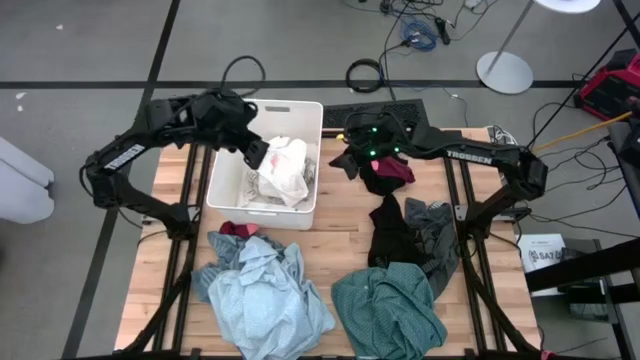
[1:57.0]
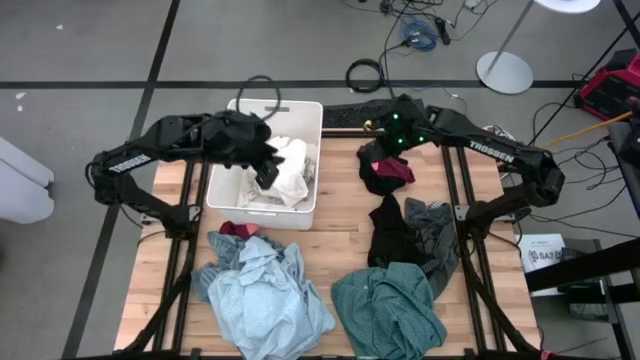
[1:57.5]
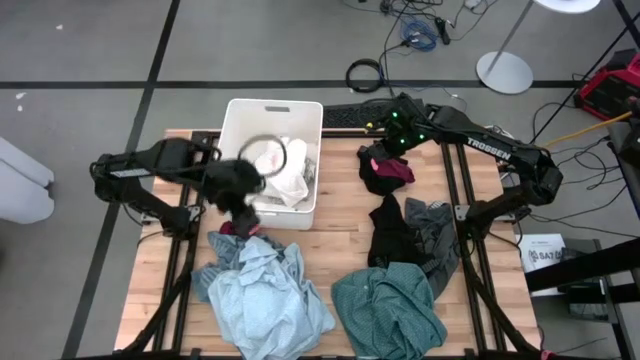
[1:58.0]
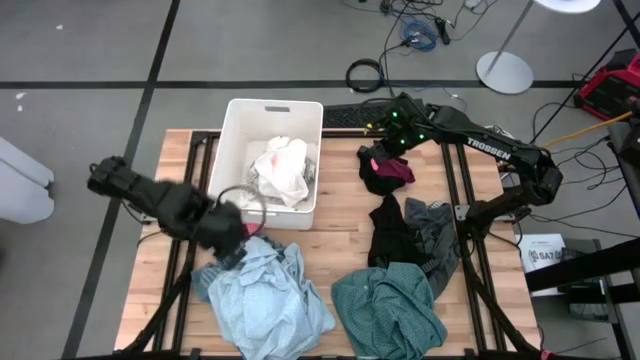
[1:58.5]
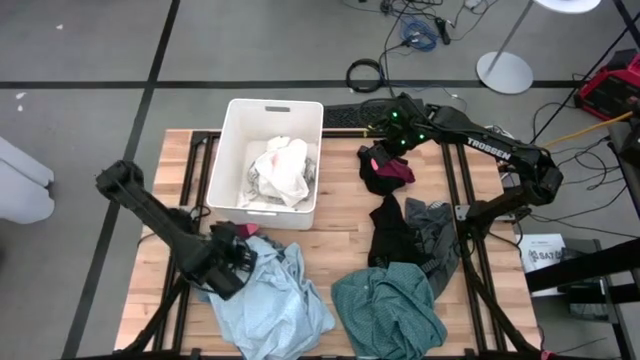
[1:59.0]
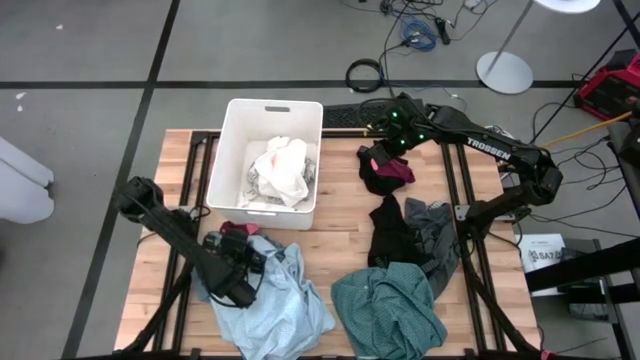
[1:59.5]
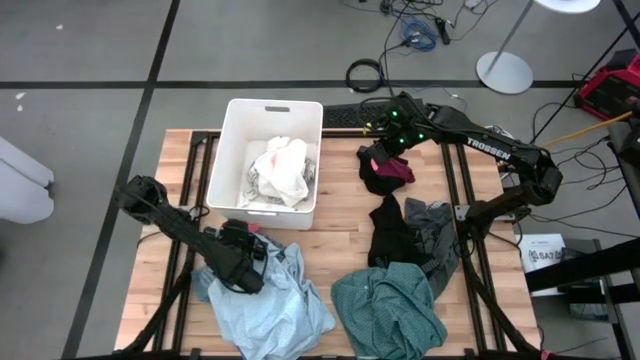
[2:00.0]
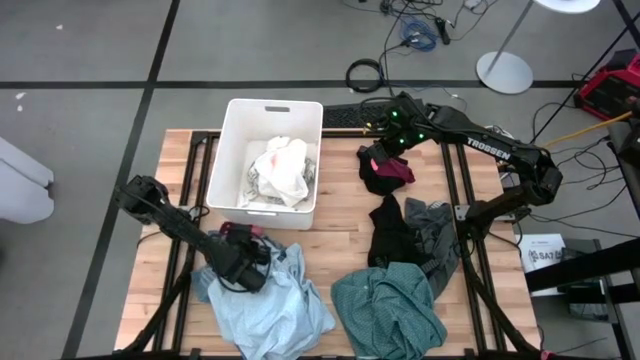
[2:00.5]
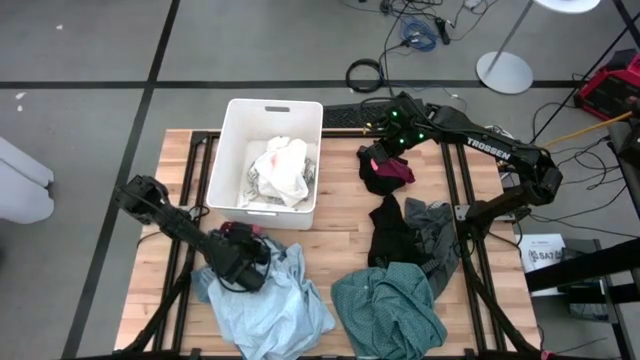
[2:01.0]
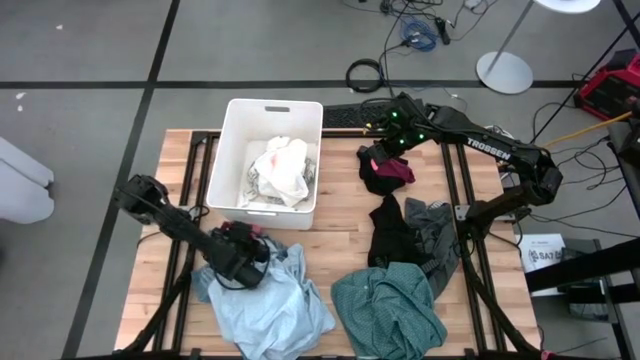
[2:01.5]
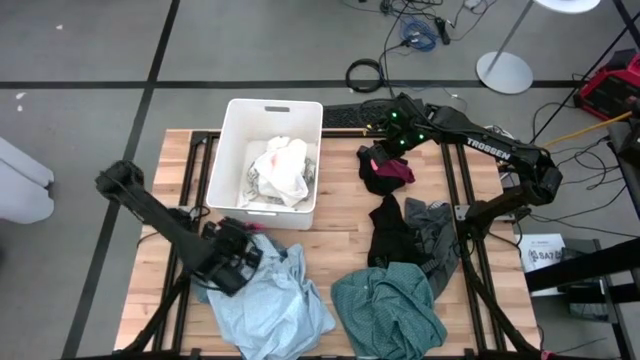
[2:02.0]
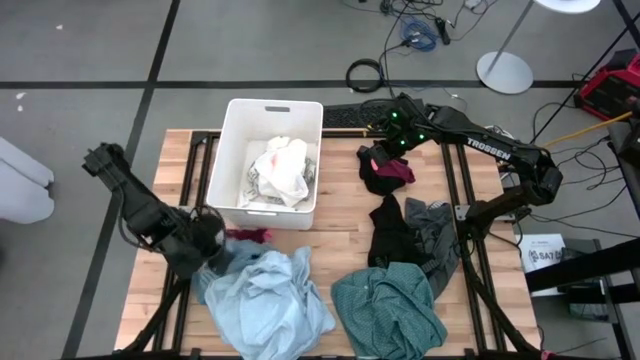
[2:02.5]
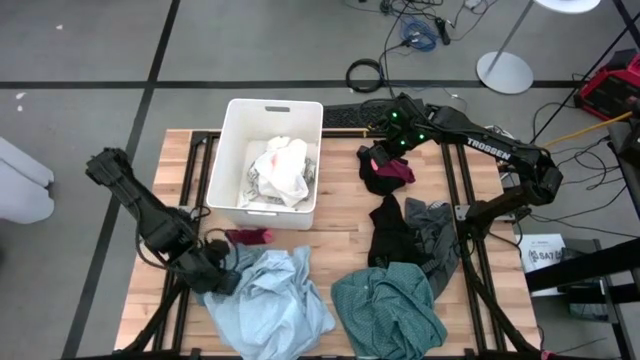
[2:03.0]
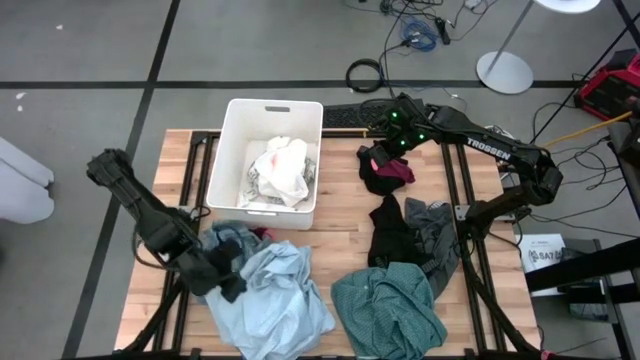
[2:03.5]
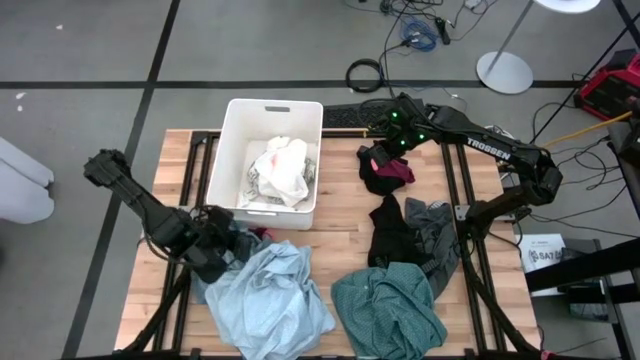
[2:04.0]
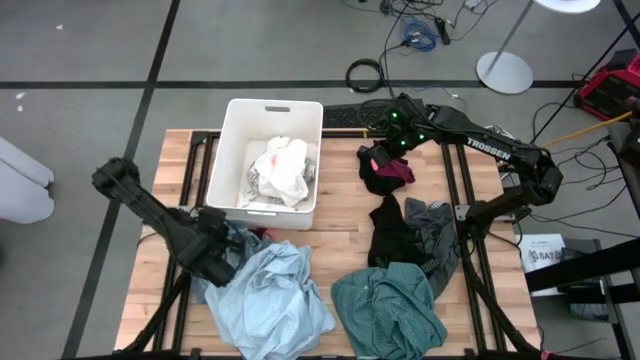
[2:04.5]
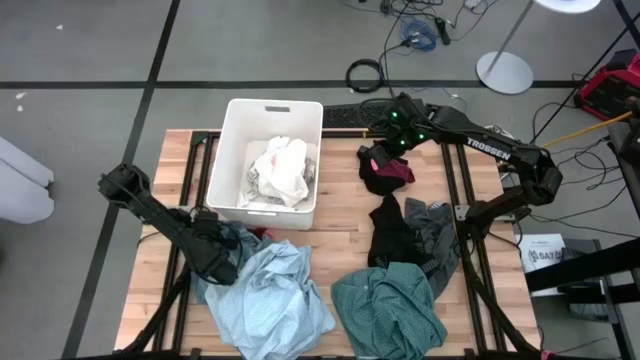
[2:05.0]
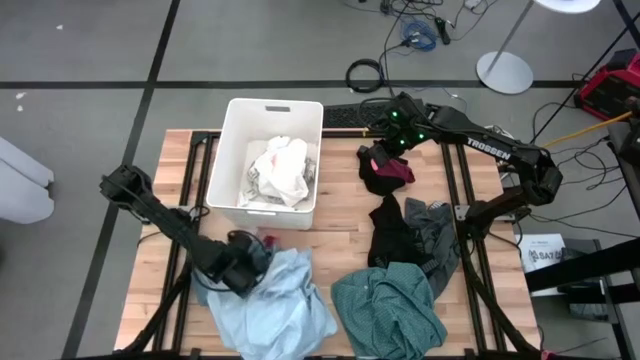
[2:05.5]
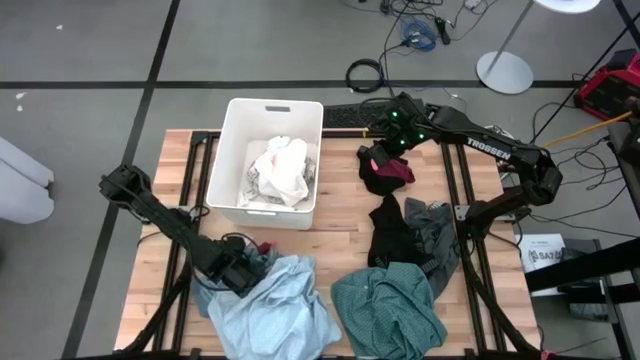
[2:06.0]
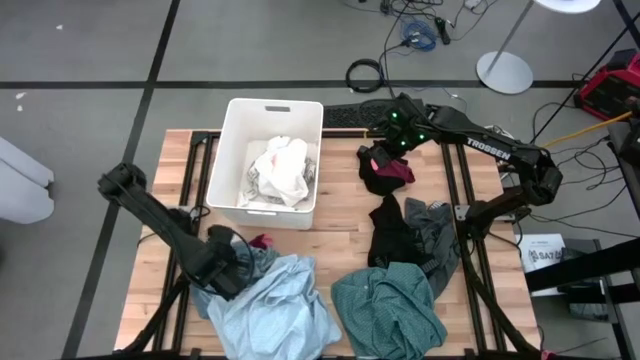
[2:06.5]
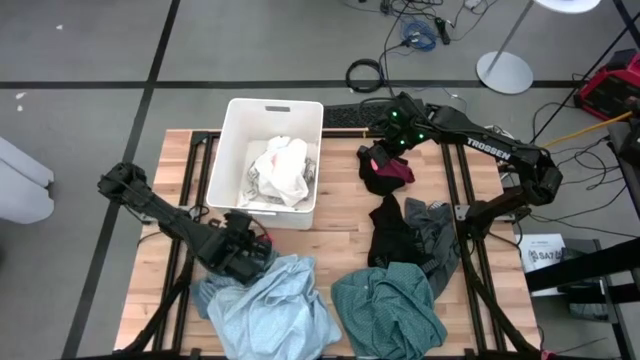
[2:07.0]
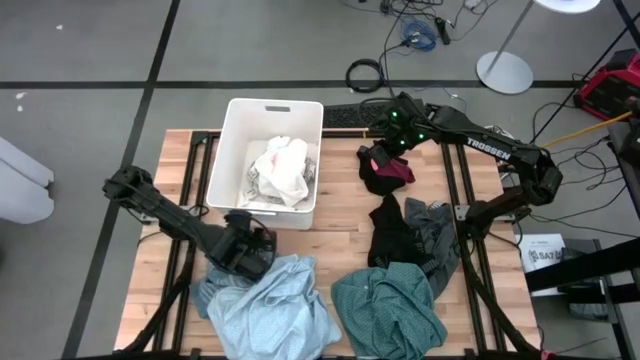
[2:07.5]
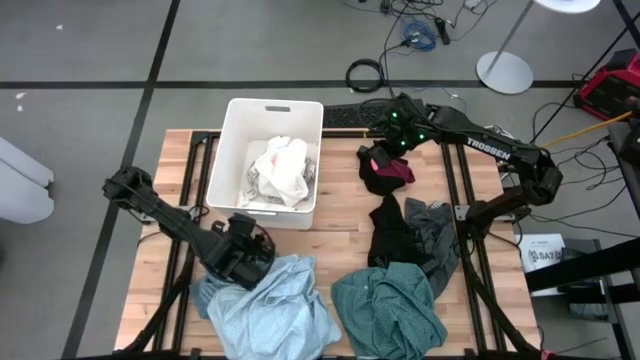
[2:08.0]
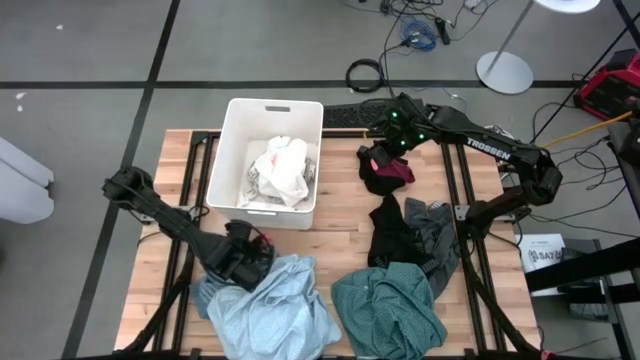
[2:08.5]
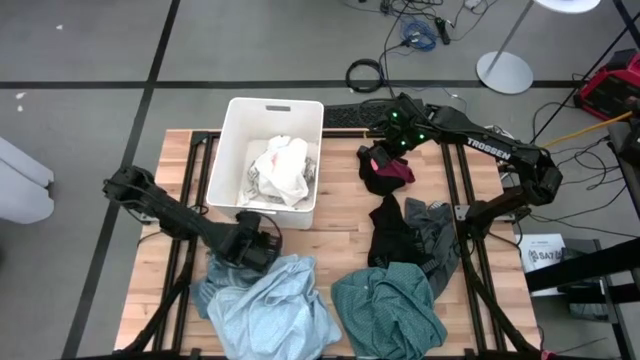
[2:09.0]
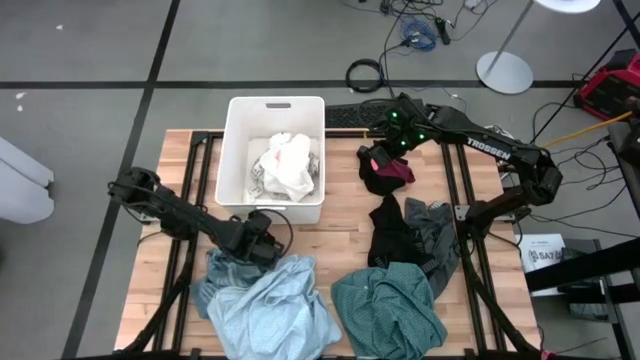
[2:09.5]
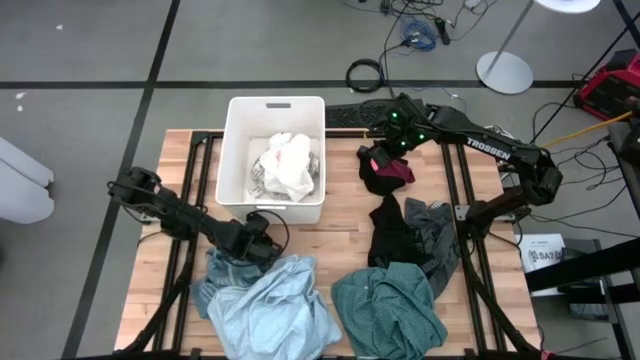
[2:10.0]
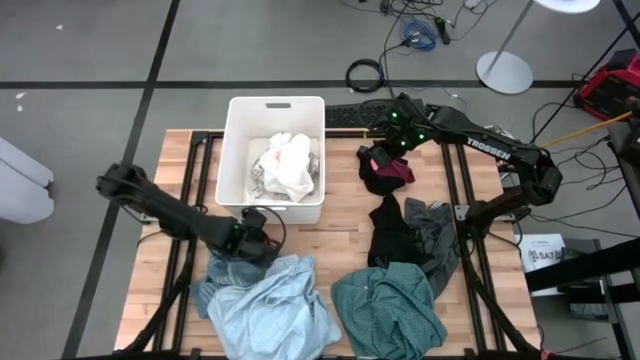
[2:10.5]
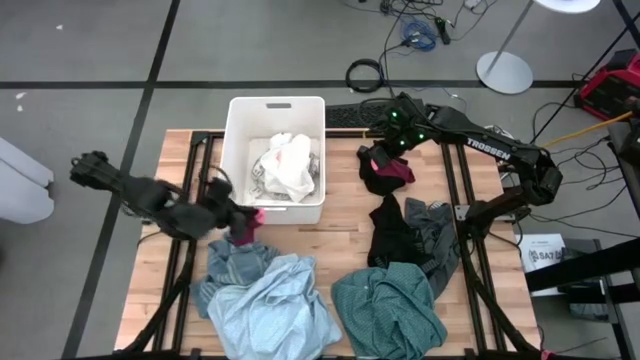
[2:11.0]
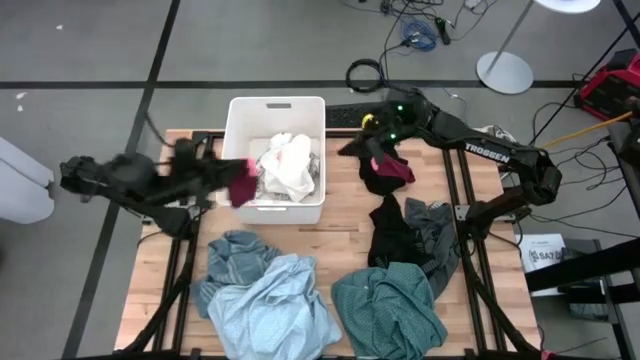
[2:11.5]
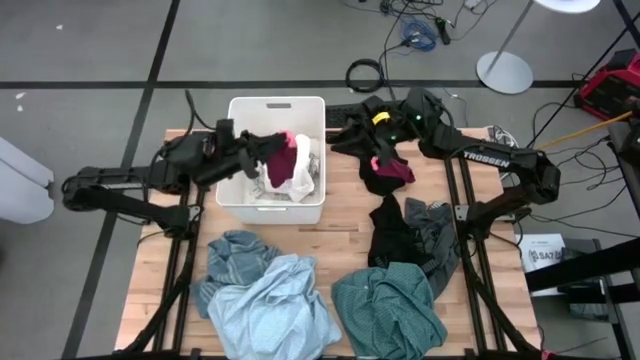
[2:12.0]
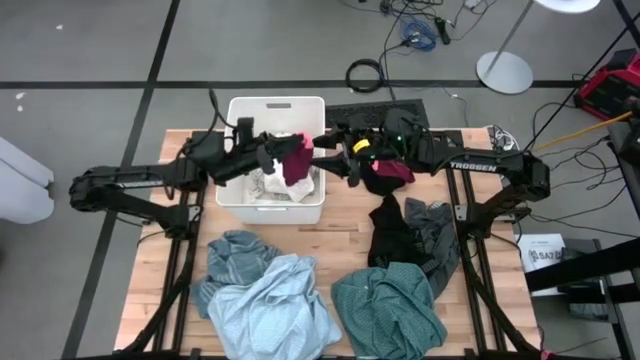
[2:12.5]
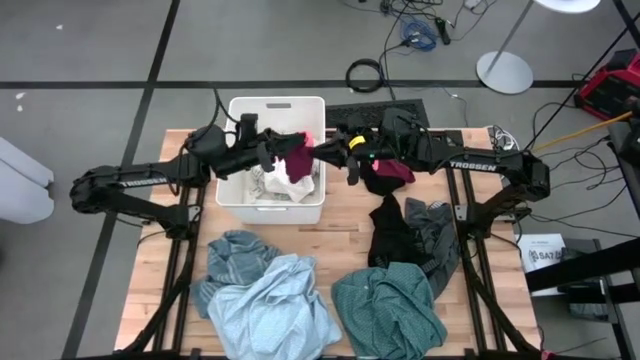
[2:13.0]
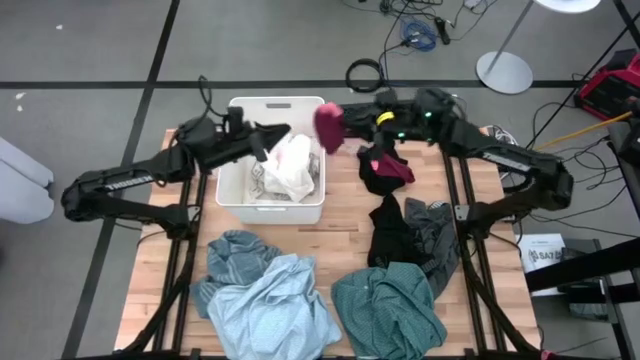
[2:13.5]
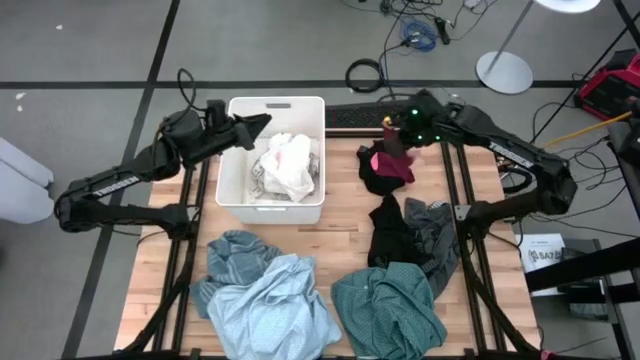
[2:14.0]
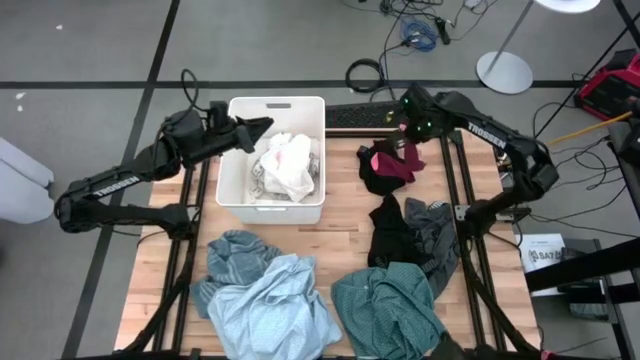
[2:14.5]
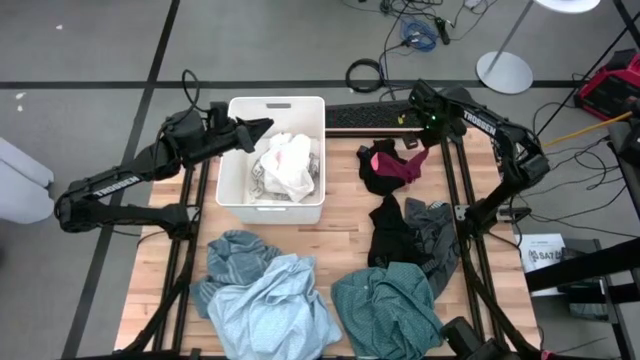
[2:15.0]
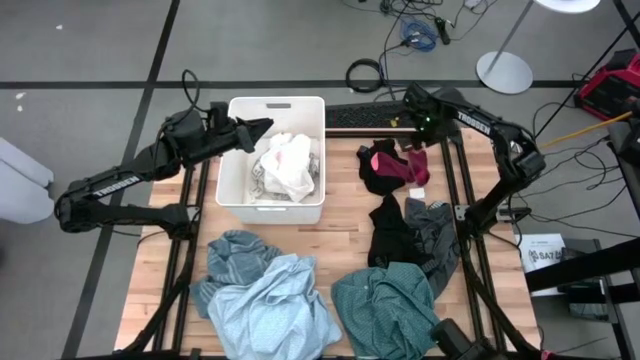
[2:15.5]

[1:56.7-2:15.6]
Task: Sort clothes
Move the bottom left red sock to the top right of the table

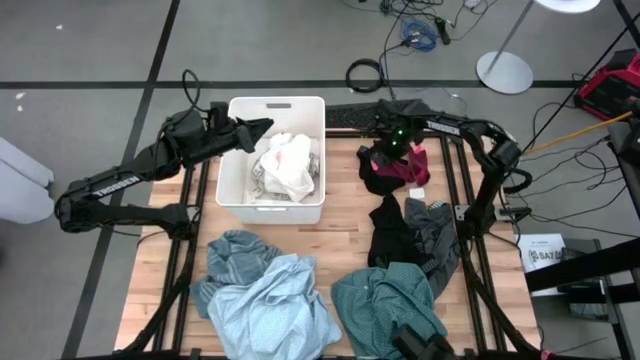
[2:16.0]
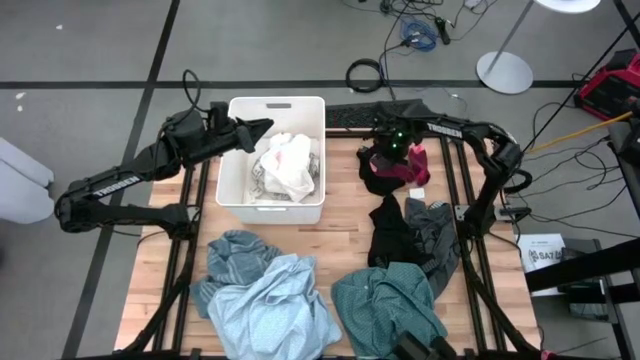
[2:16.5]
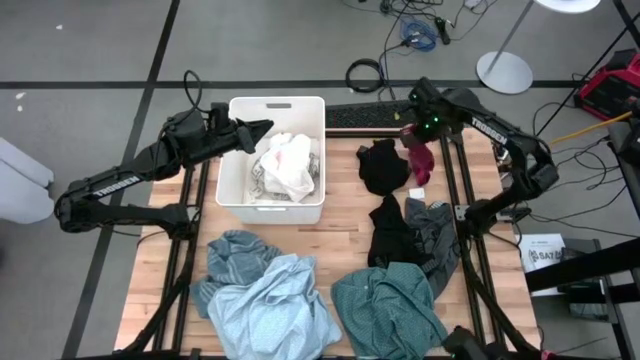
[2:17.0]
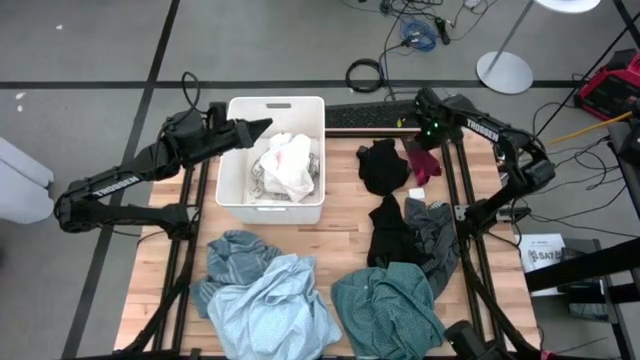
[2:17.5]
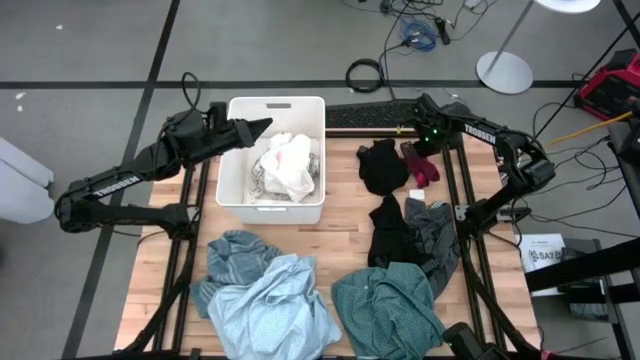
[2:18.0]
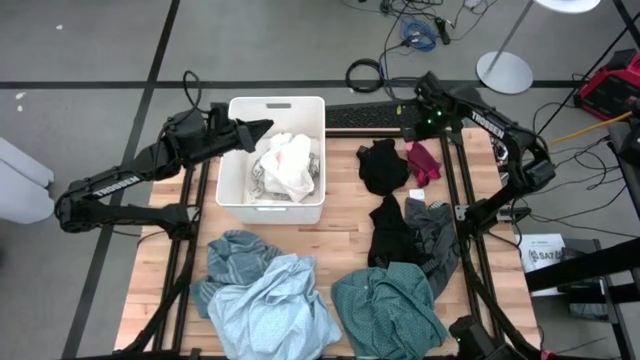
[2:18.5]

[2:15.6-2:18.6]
Stack the left red sock on the top of red sock
